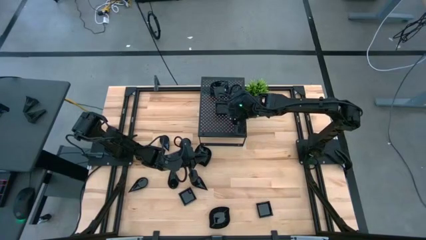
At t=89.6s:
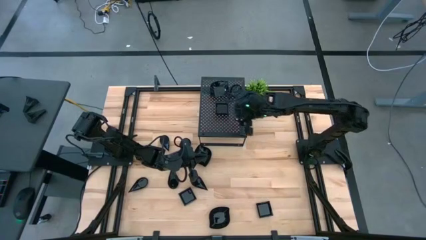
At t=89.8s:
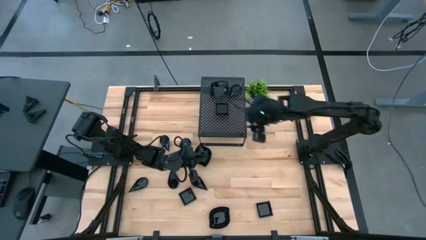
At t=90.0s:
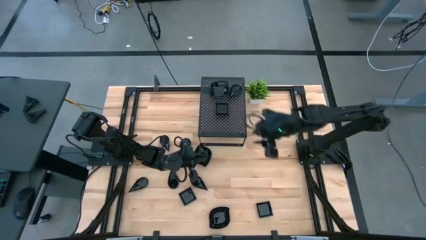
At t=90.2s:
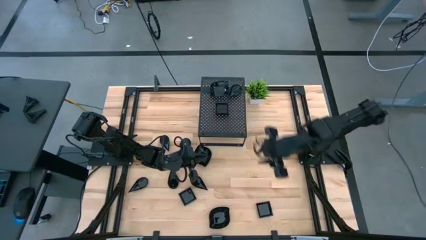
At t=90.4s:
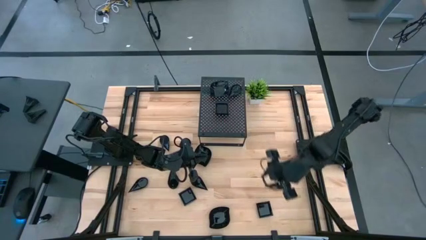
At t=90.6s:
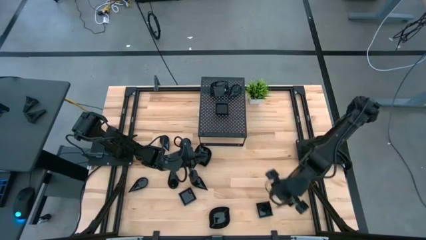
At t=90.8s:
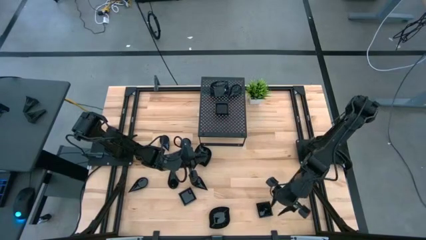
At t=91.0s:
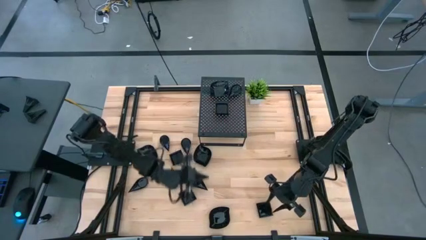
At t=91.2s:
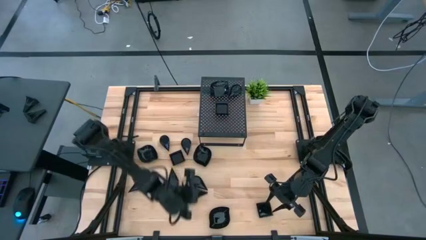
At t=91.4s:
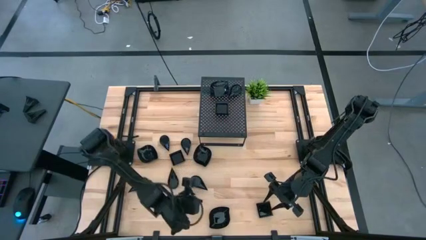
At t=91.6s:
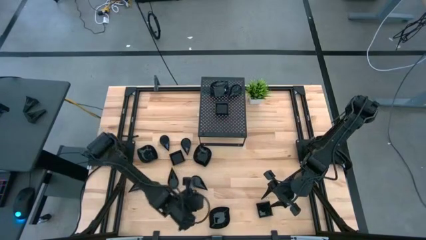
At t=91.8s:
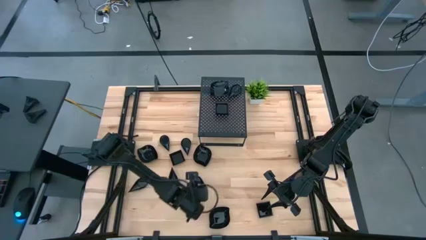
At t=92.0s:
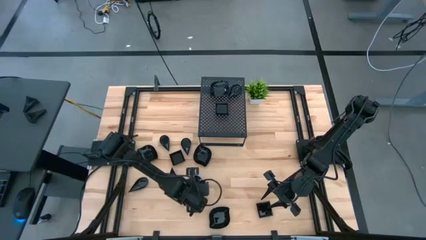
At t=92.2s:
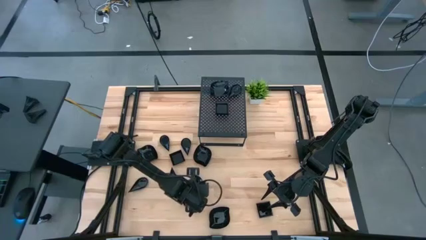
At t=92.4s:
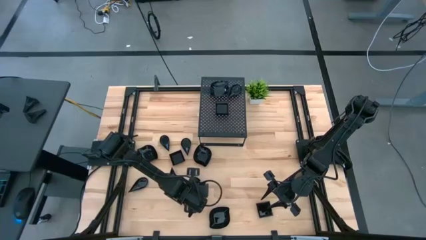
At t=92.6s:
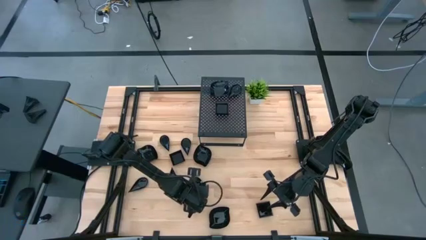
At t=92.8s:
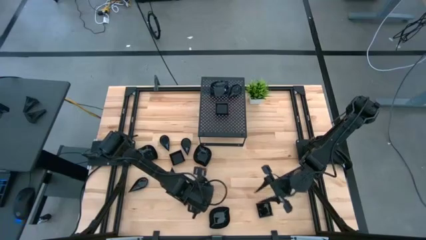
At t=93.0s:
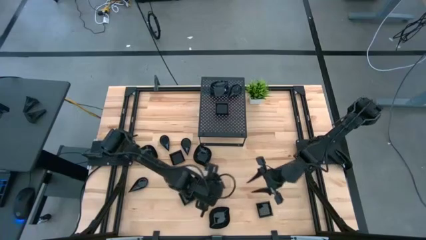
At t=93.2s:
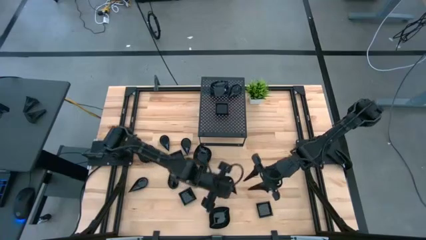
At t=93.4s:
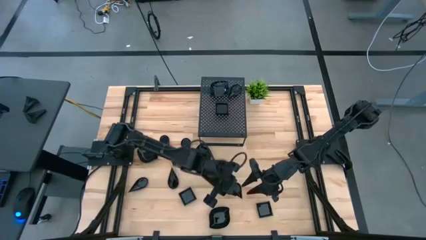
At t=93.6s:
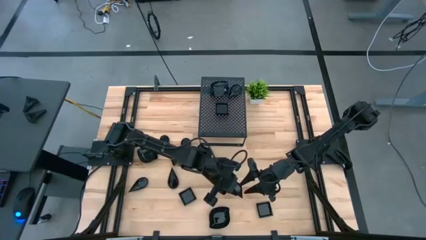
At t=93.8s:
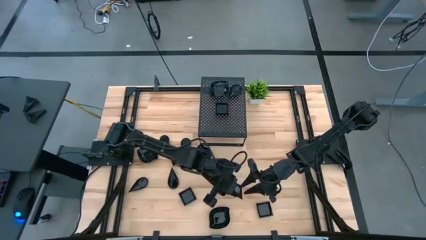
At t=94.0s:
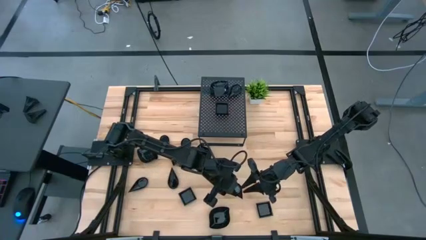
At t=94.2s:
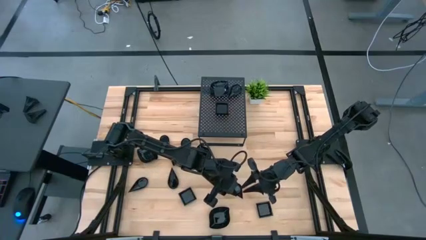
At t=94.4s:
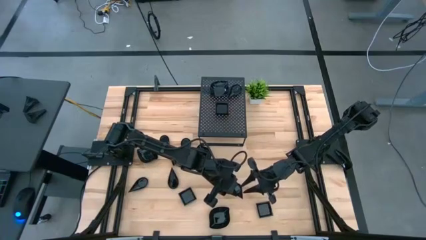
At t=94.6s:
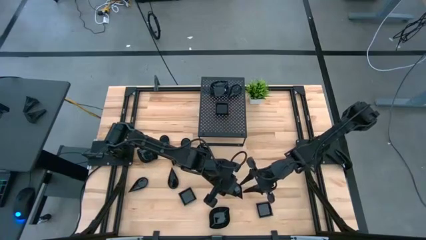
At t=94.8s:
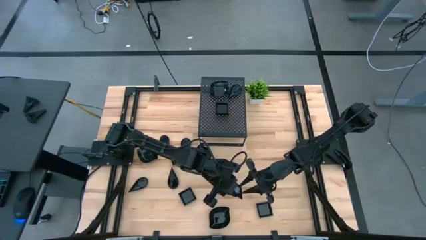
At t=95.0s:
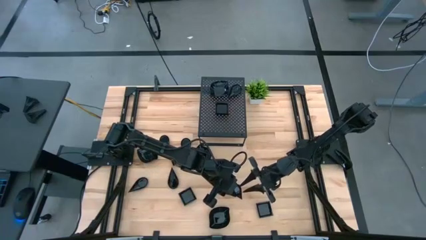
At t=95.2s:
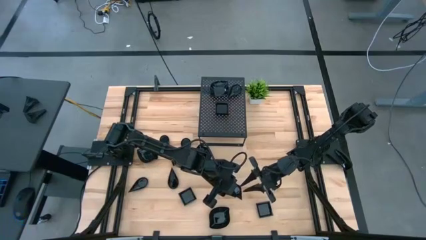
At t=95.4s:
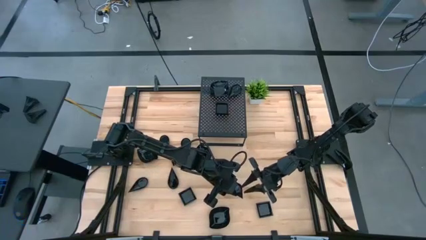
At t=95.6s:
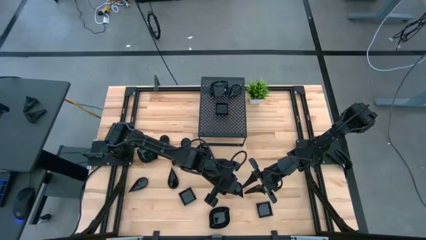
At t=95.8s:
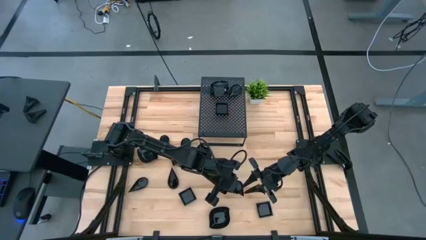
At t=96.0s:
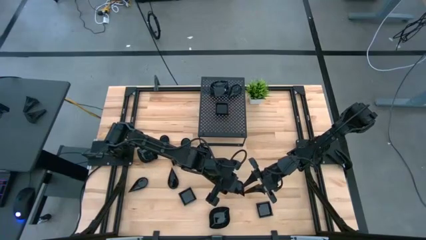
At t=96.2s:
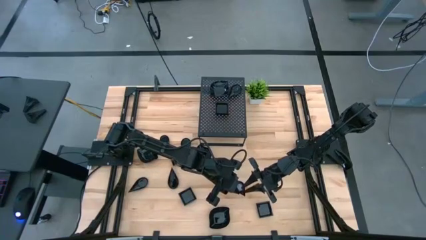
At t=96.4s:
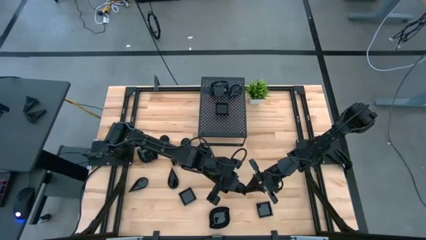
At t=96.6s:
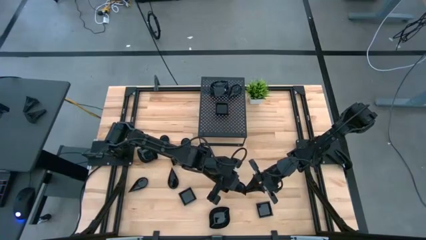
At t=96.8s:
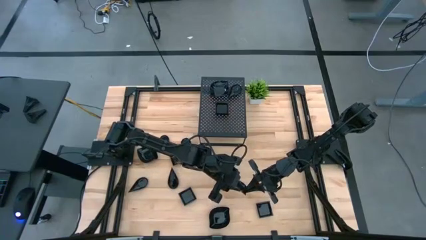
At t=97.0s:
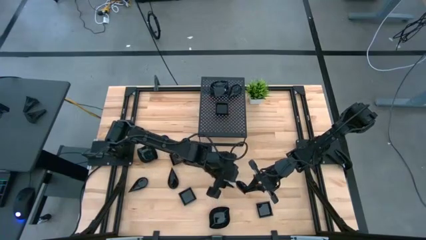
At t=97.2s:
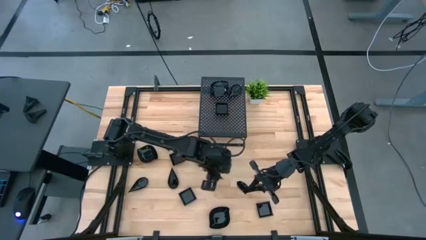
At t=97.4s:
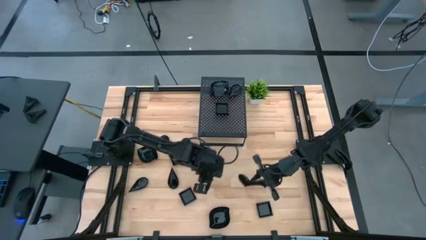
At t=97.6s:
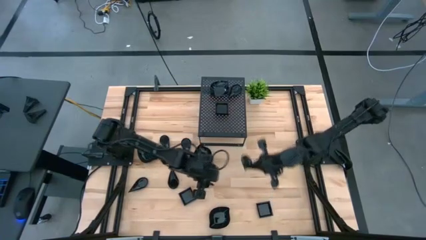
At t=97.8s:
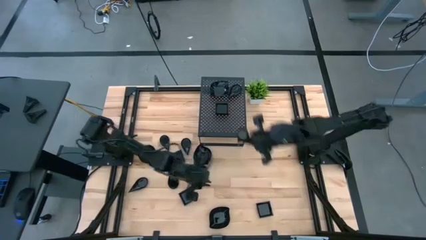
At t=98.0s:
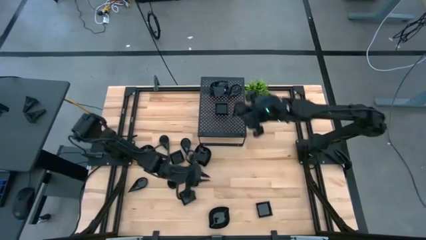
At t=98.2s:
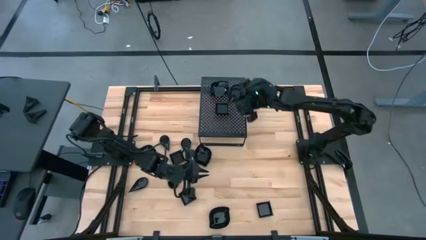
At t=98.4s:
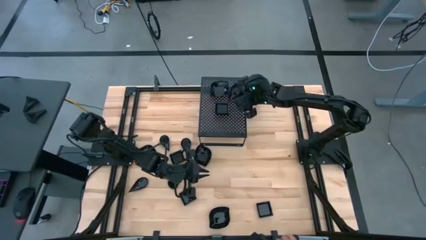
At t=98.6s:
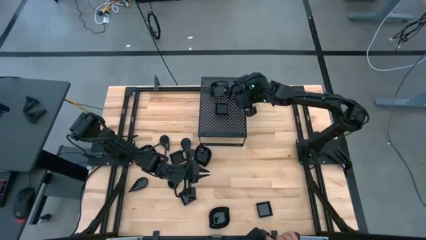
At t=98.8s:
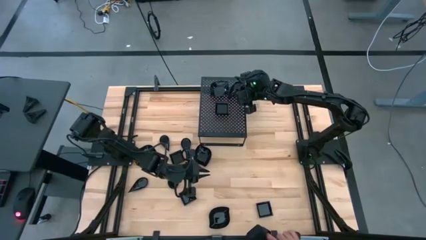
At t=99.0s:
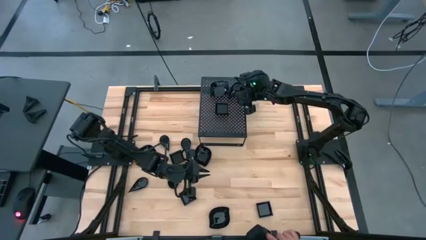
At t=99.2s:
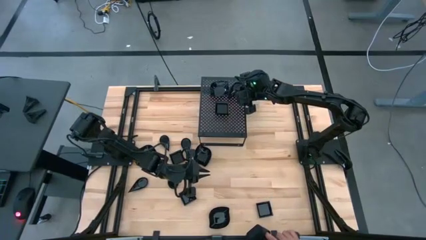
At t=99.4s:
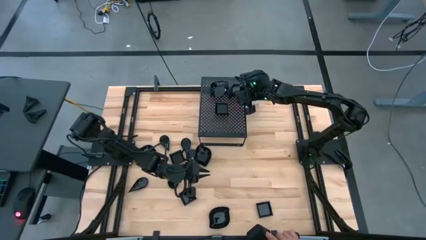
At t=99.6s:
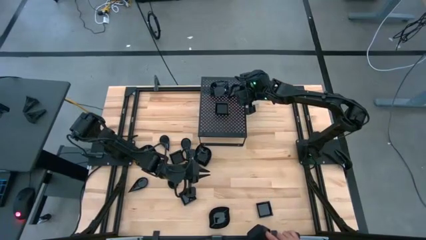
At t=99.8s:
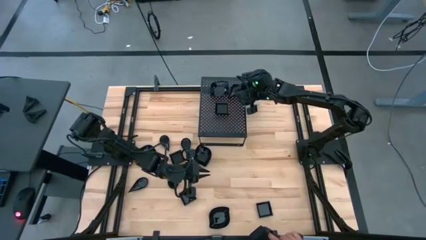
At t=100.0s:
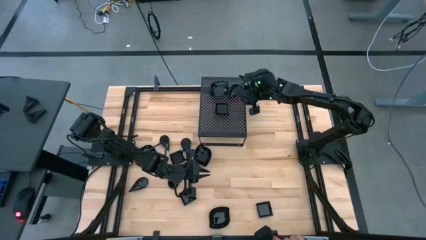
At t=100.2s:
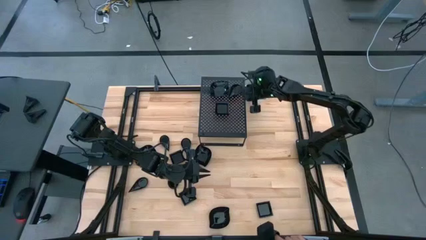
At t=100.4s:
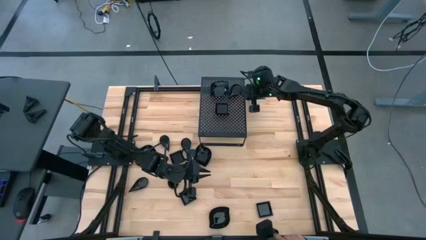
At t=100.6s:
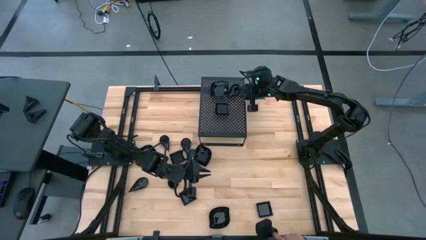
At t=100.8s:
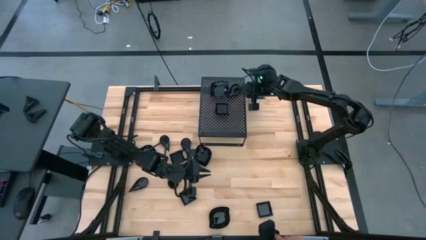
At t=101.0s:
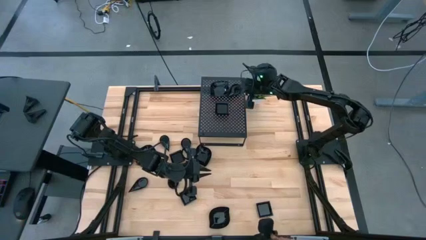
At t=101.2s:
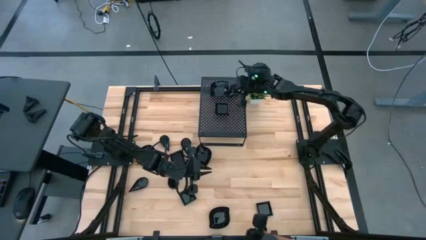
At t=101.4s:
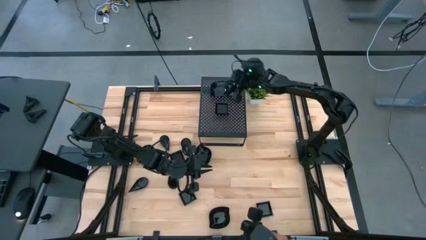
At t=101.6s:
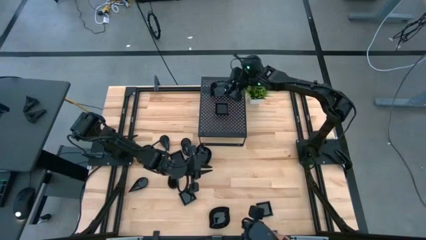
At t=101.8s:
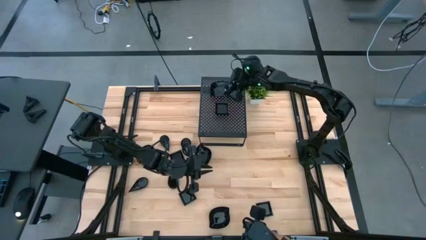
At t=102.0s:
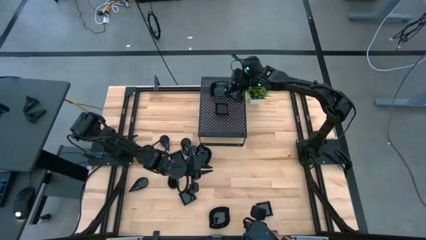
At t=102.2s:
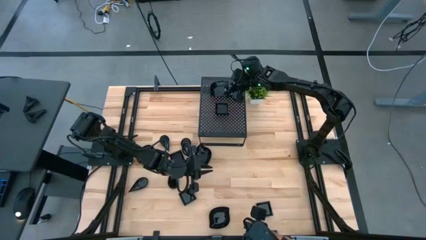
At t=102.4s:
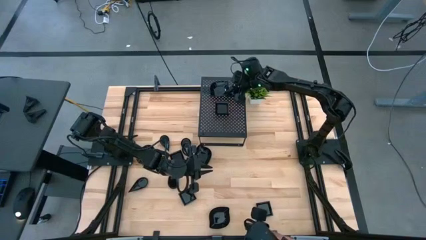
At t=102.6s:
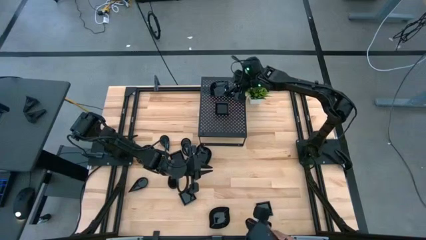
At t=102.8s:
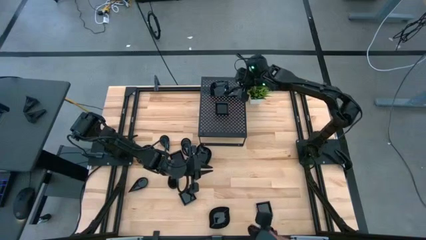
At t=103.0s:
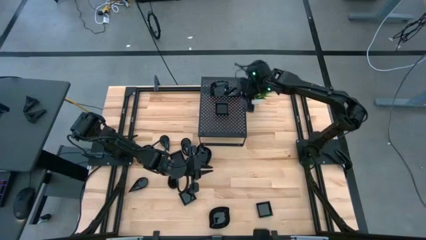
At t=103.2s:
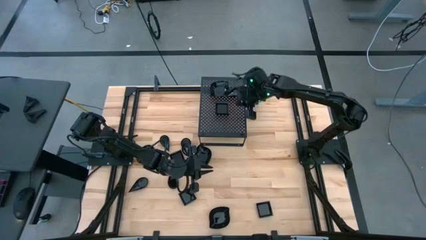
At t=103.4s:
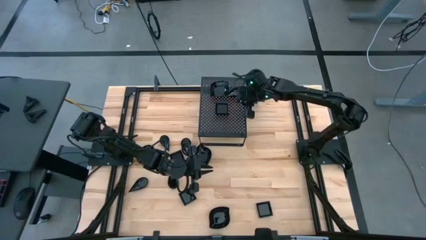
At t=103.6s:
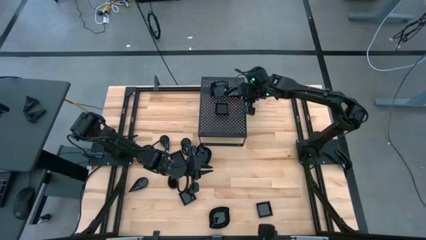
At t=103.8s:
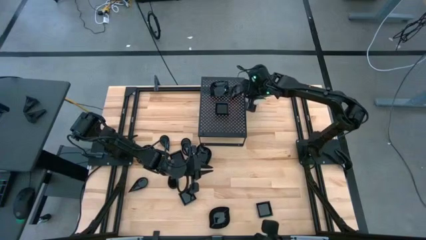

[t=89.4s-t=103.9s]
Task: Pick & Place Mini shaped plates
Stack the black drop-shaped plate on top of the black drop-shaped plate on the shelf

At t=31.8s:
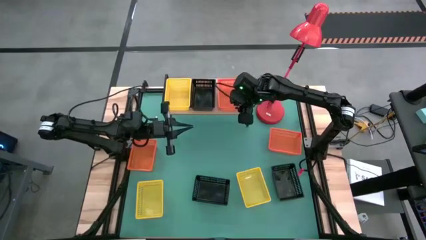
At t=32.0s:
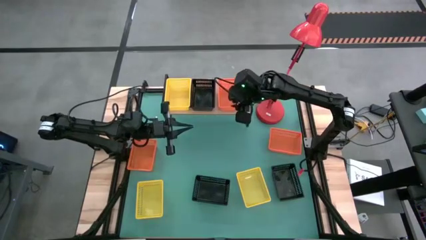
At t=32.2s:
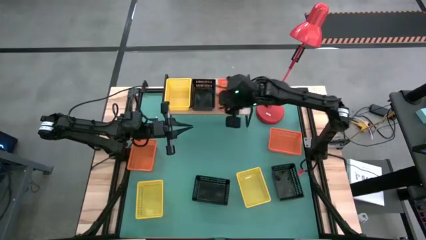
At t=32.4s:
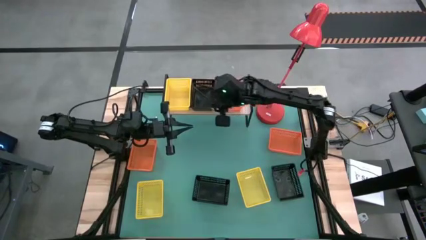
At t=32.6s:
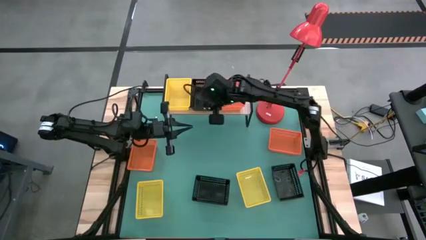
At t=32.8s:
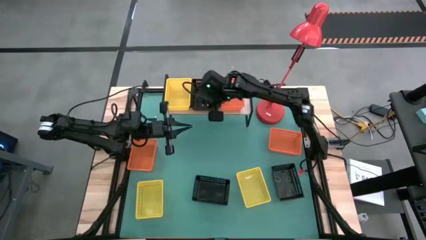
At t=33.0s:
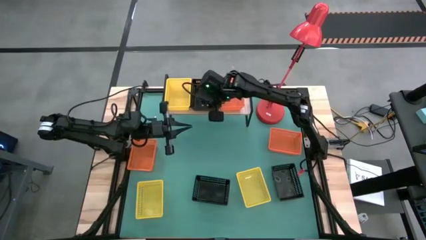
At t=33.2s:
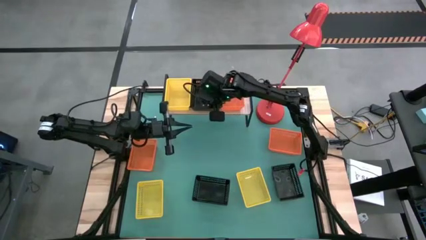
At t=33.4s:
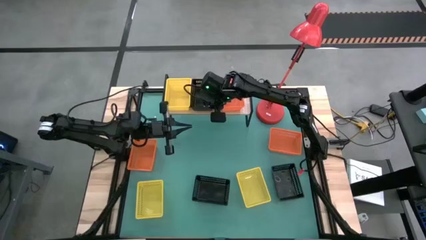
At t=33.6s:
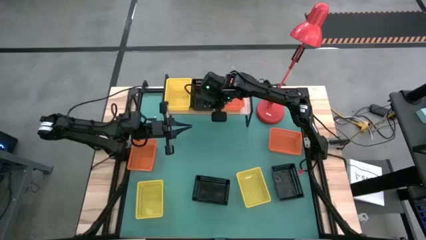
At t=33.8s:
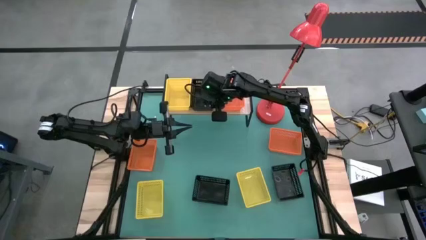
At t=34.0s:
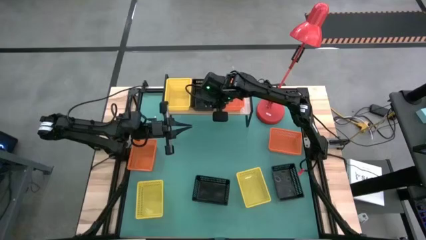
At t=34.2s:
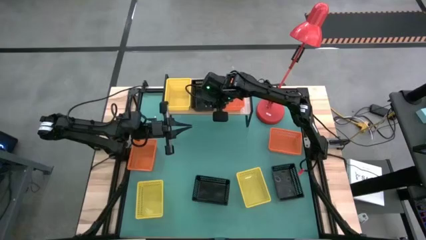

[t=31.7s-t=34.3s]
Task: Stack baskets on shelf by color
Adjust the black bin
